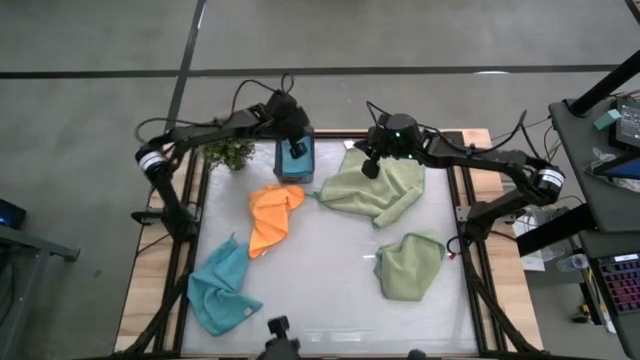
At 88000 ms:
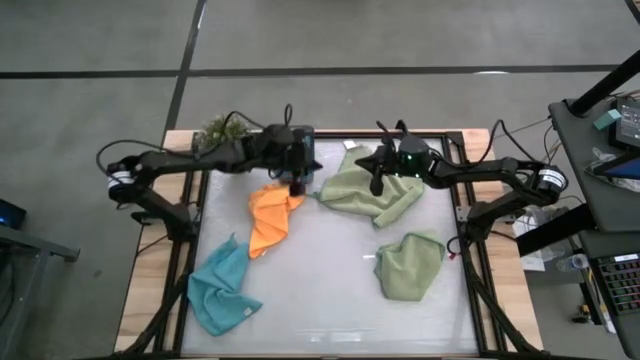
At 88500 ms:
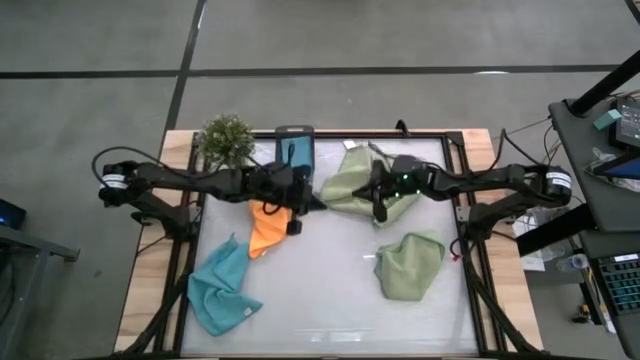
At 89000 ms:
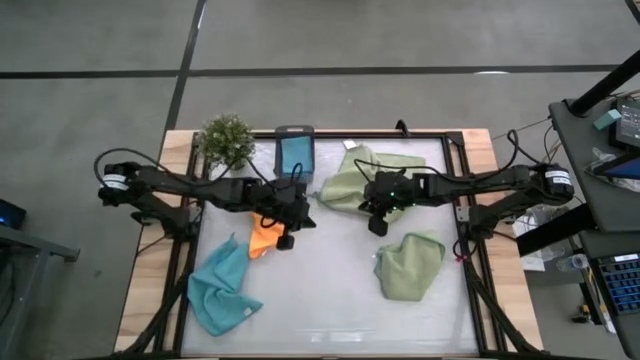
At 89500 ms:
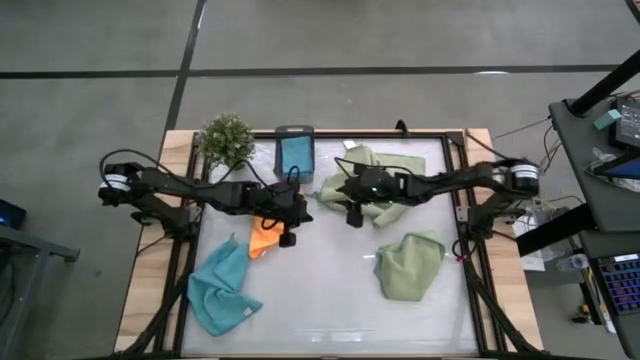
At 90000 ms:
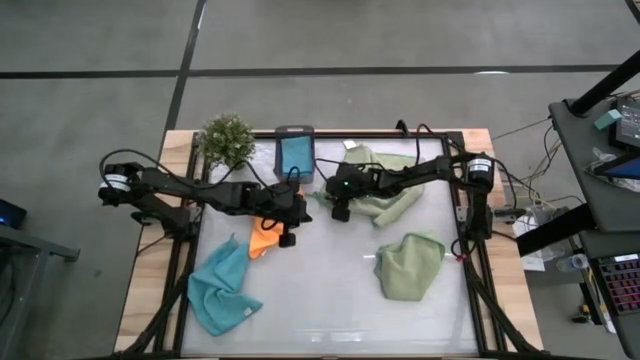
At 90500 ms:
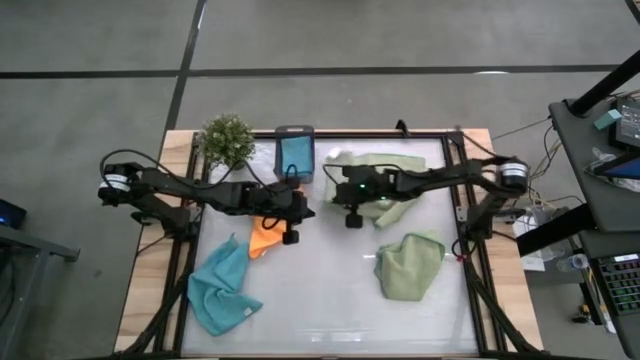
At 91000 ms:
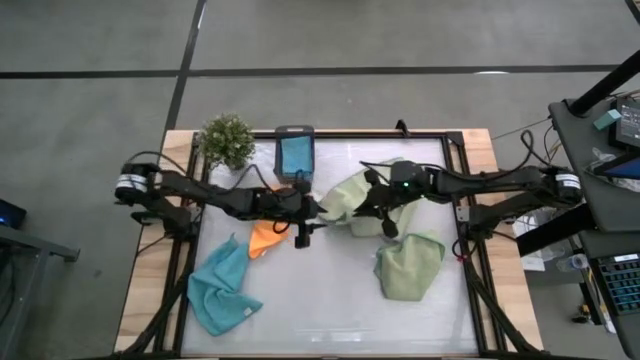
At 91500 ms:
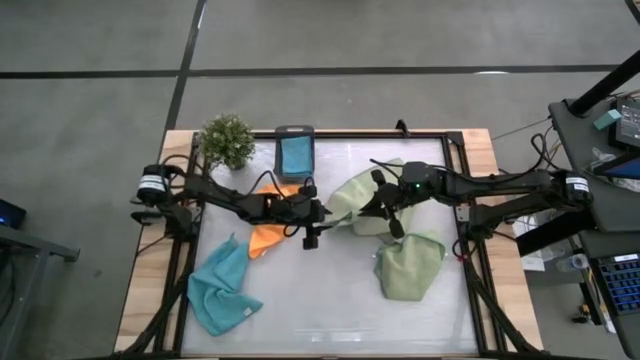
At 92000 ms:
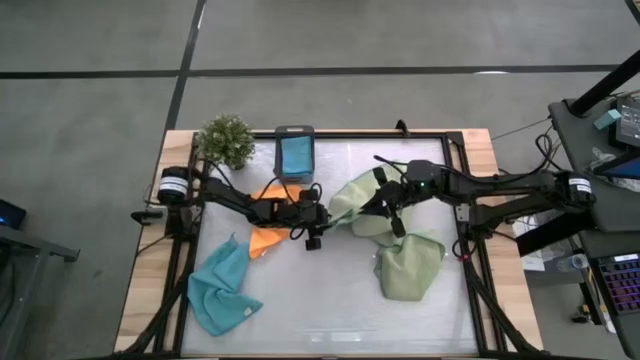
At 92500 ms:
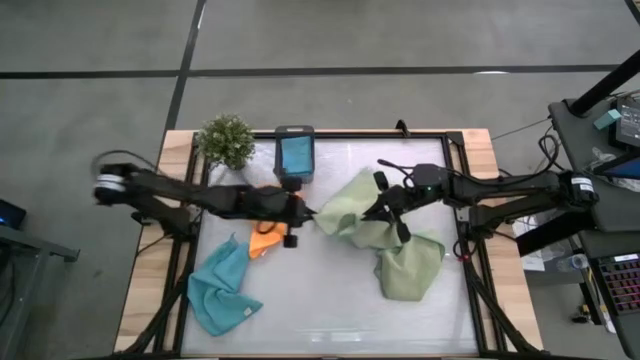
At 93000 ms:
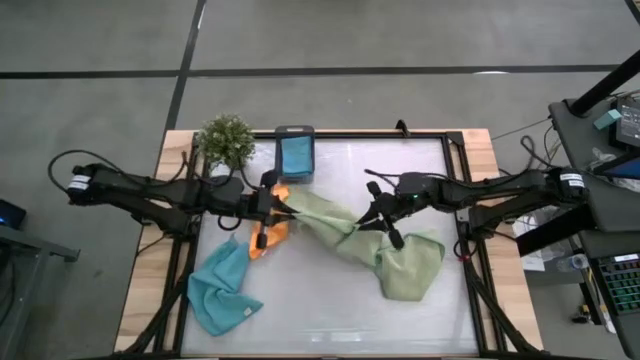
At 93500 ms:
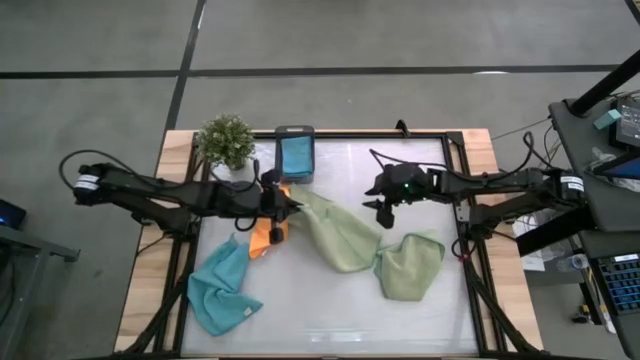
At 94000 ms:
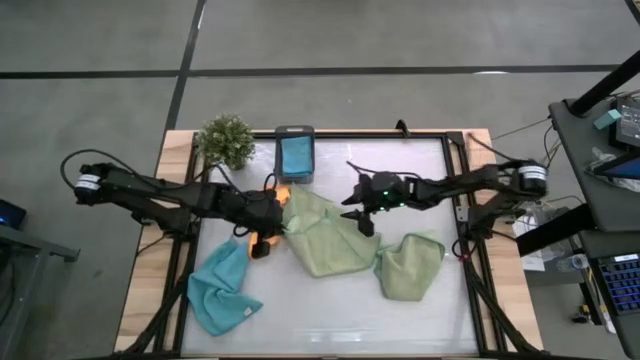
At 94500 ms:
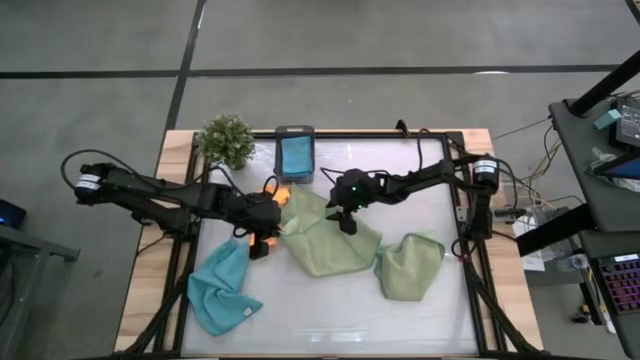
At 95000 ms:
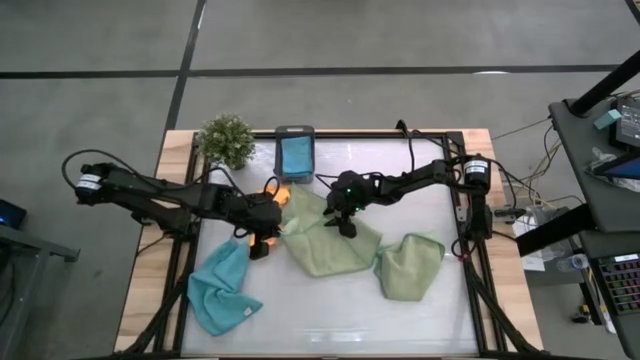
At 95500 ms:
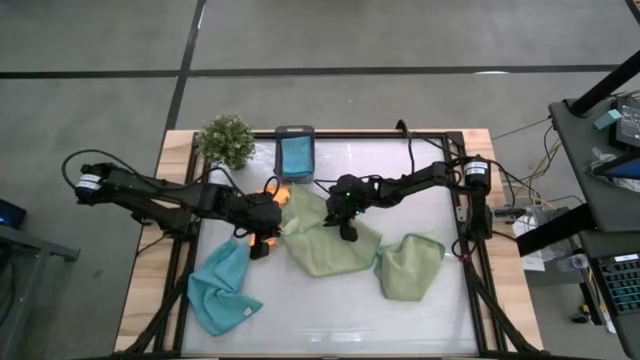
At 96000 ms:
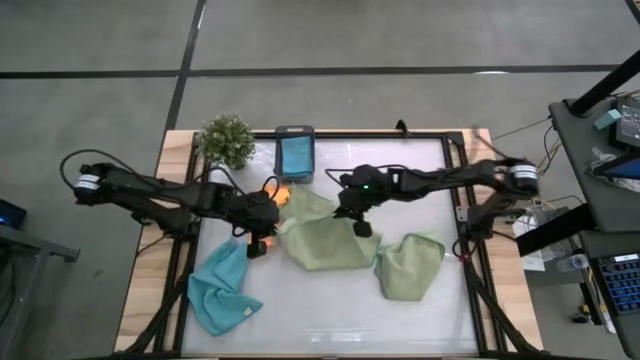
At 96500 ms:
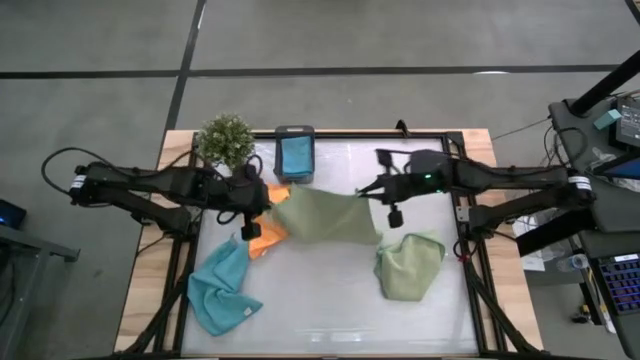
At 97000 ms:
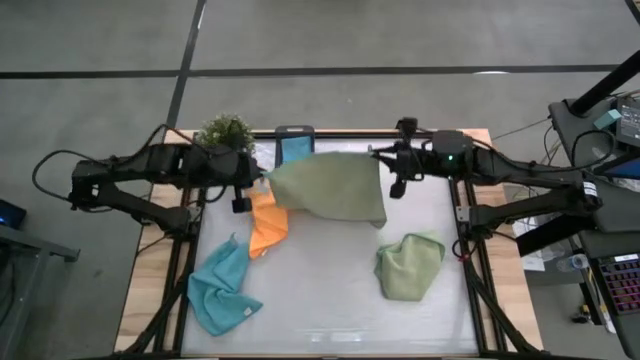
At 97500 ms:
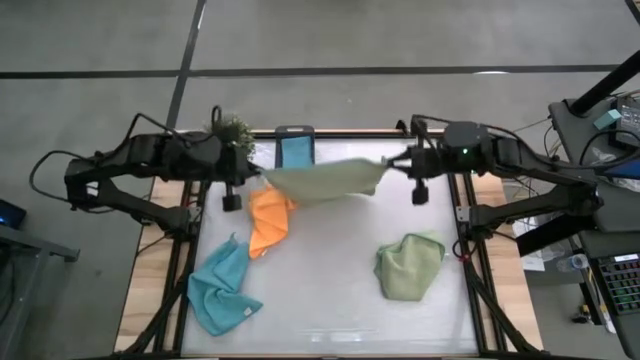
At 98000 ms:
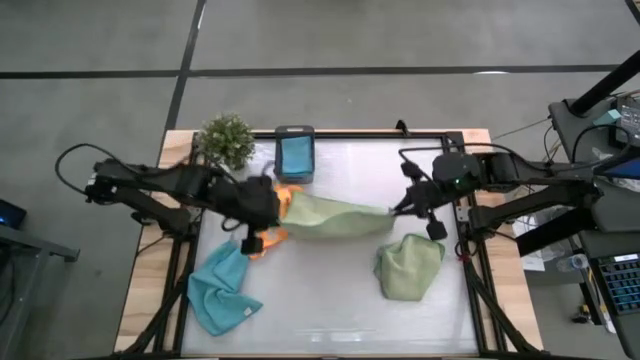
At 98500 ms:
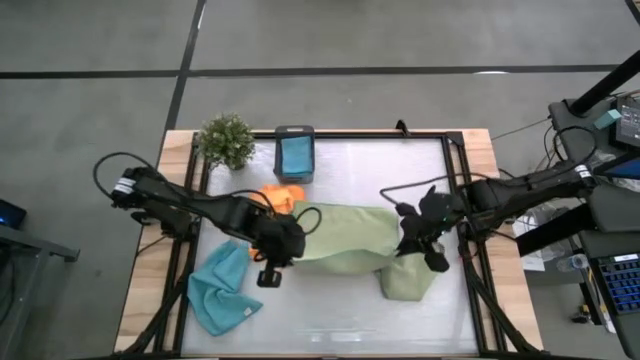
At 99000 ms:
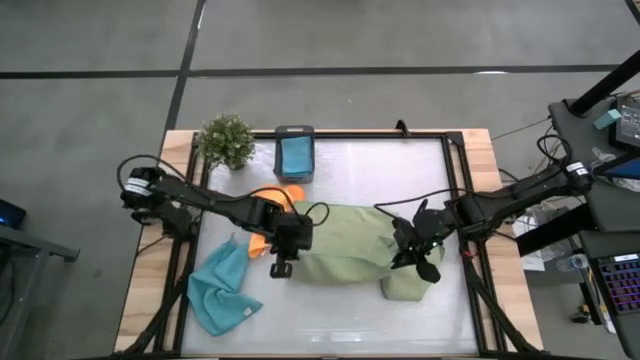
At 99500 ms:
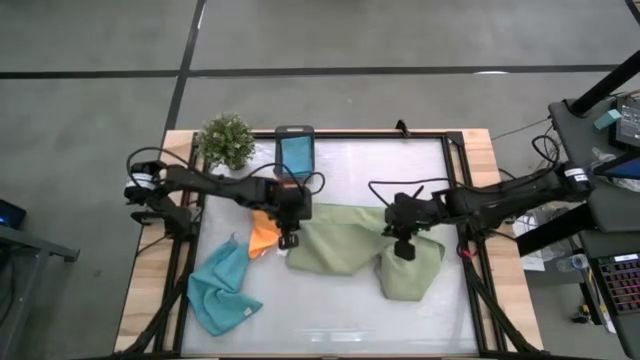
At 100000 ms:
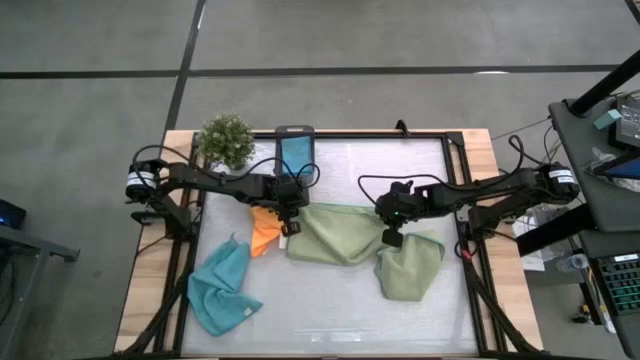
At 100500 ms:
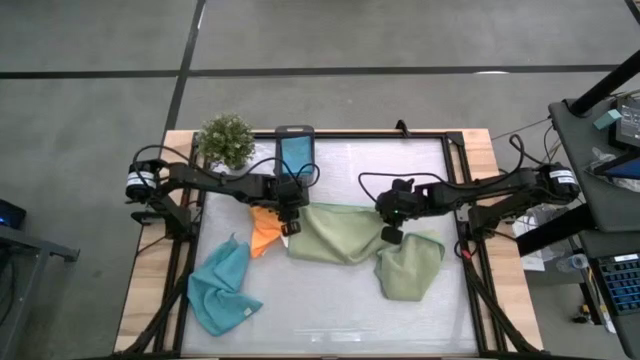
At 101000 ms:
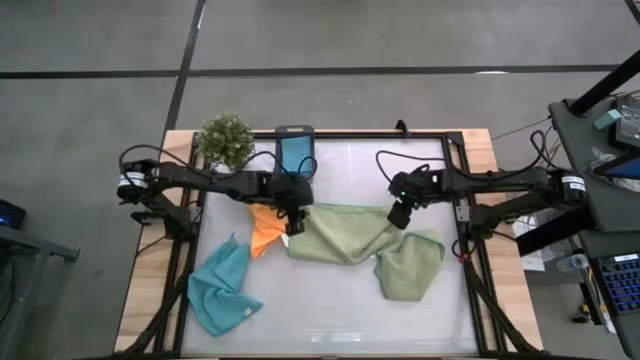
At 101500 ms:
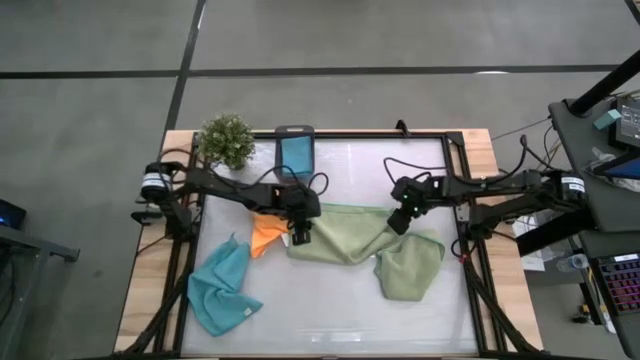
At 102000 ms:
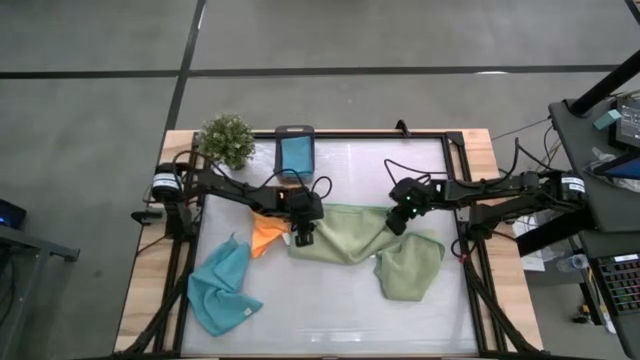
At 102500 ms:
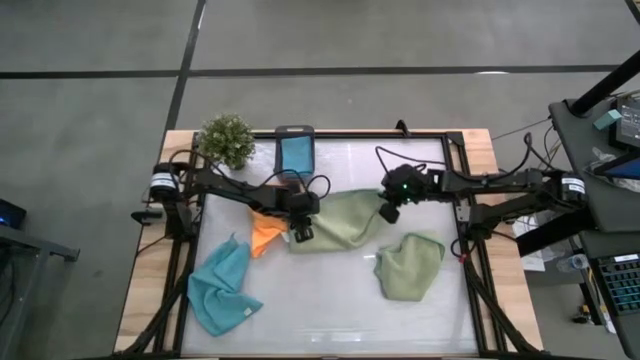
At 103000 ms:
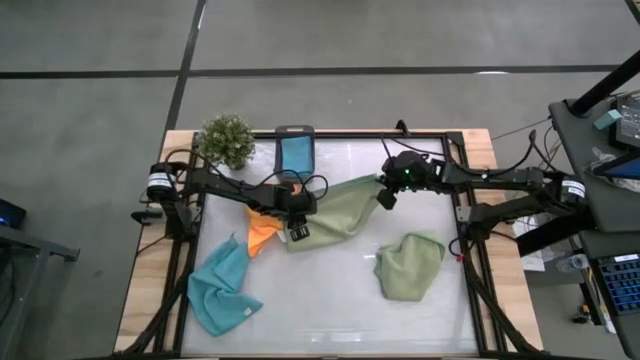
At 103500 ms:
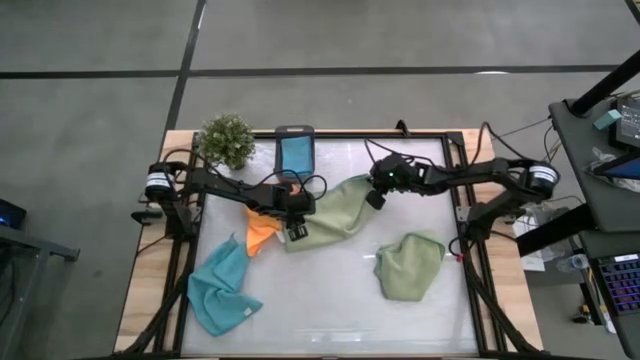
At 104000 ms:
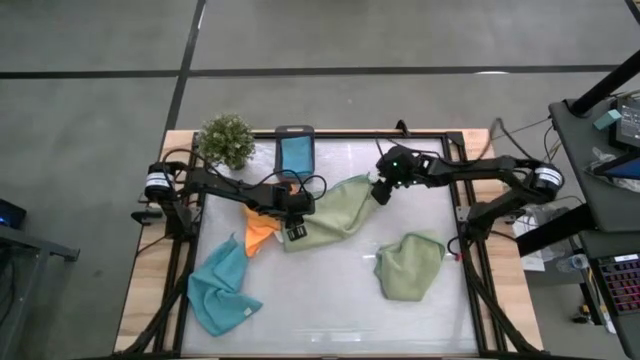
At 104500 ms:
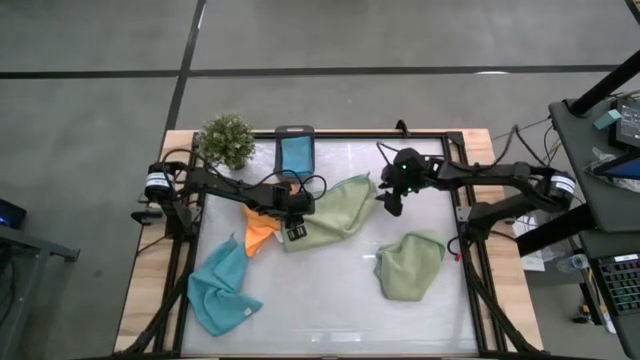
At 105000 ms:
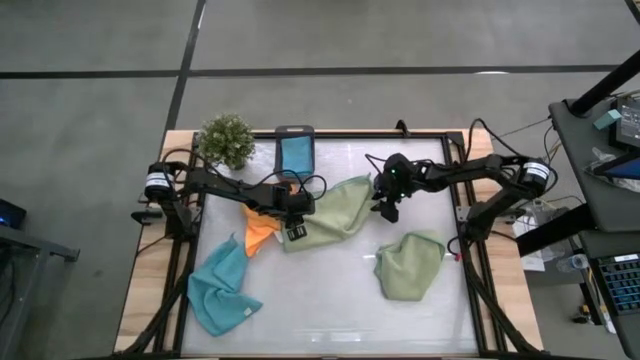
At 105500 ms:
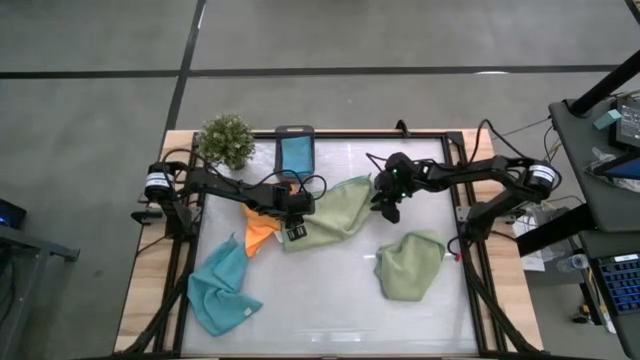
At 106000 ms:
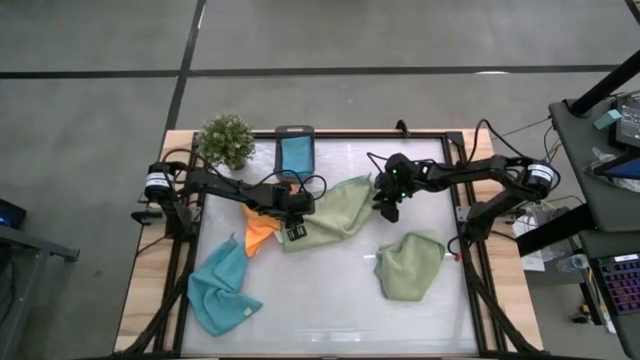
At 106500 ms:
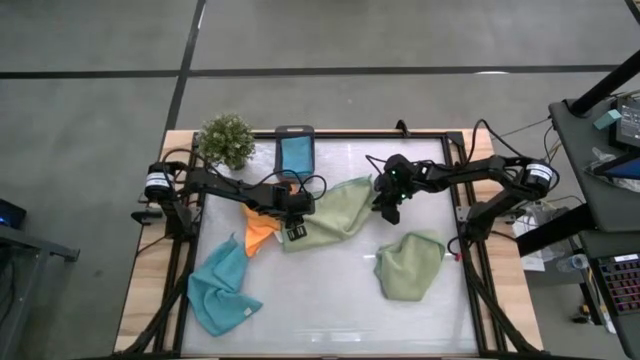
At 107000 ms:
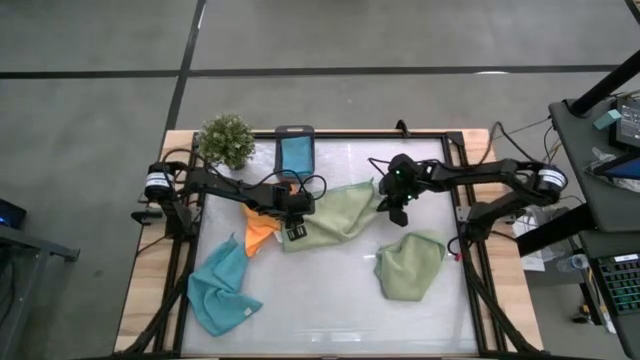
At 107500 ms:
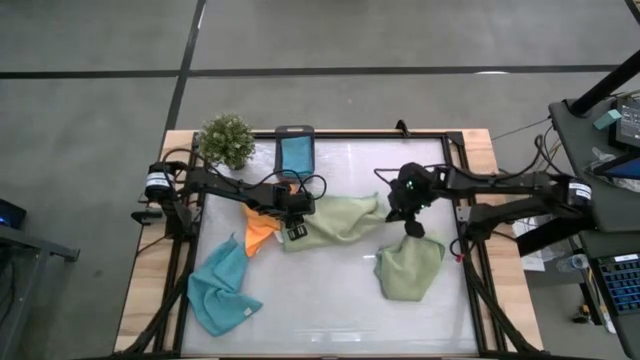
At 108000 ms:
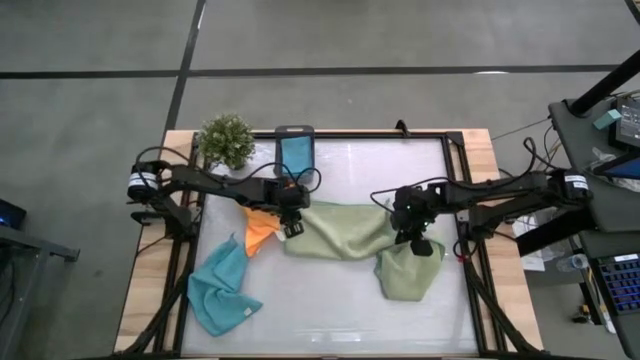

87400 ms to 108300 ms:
Task: Fold microfiber towels
Fold the top green towel
